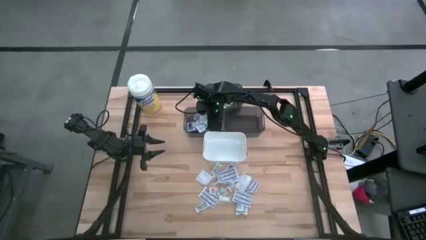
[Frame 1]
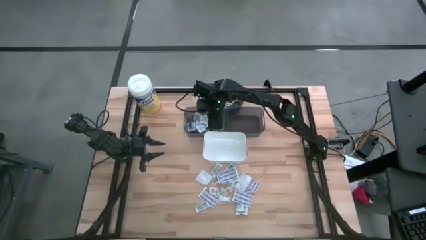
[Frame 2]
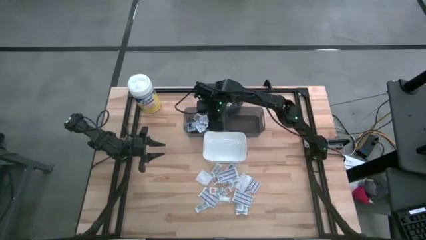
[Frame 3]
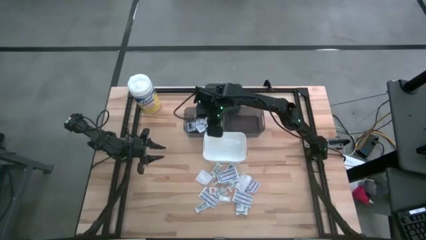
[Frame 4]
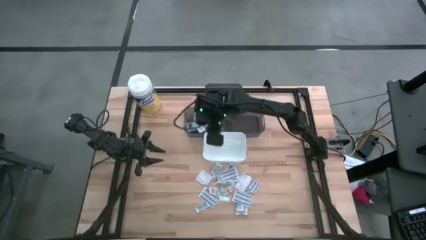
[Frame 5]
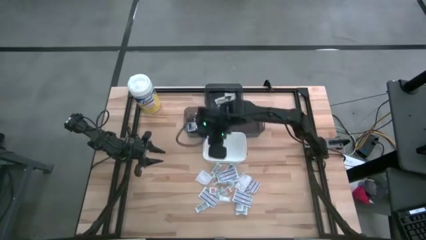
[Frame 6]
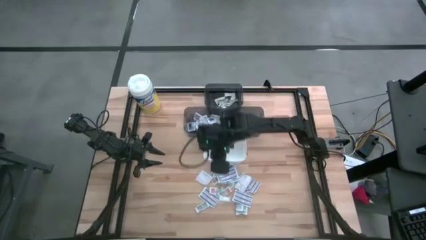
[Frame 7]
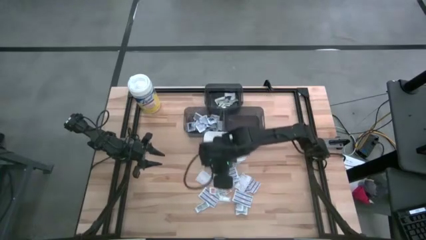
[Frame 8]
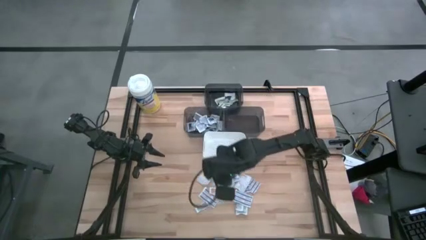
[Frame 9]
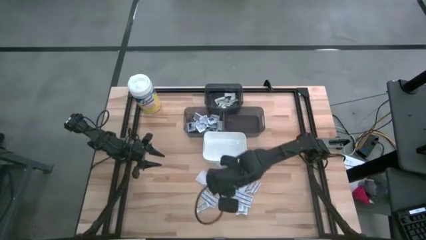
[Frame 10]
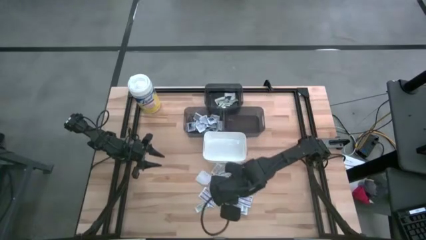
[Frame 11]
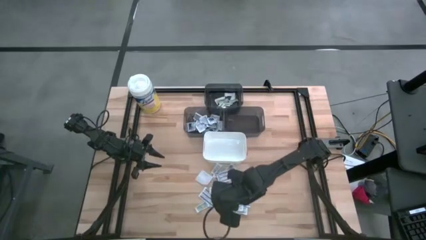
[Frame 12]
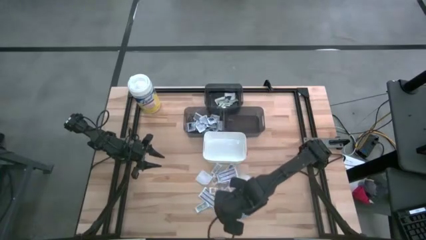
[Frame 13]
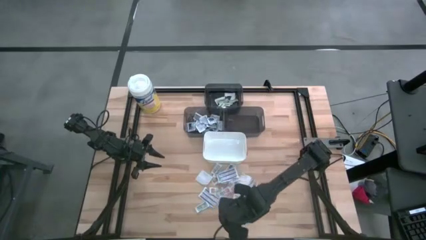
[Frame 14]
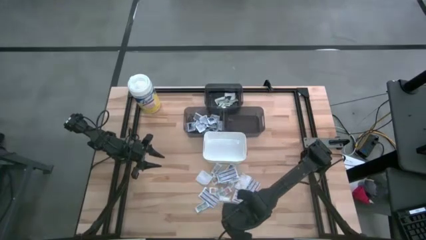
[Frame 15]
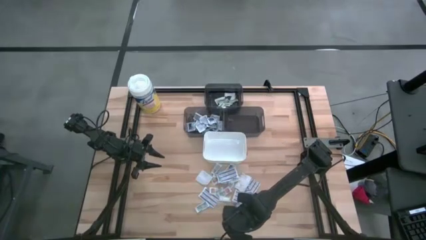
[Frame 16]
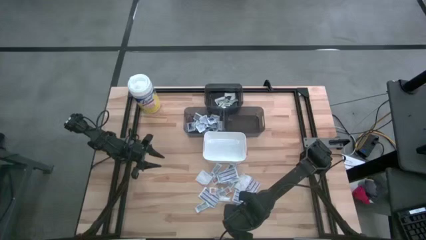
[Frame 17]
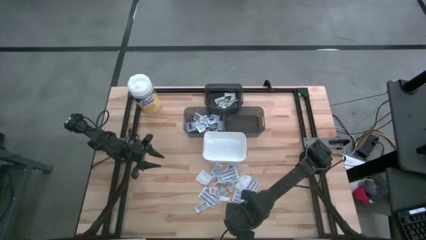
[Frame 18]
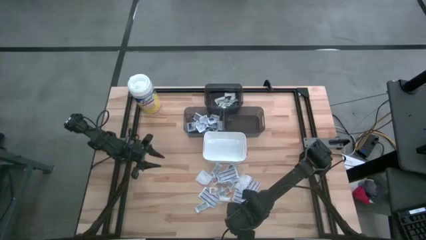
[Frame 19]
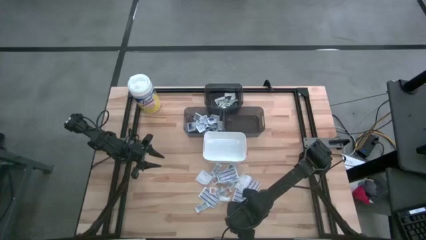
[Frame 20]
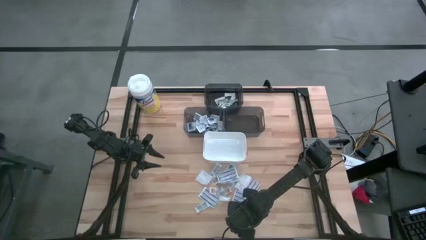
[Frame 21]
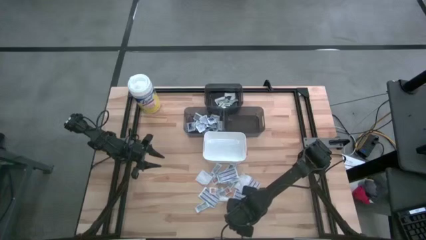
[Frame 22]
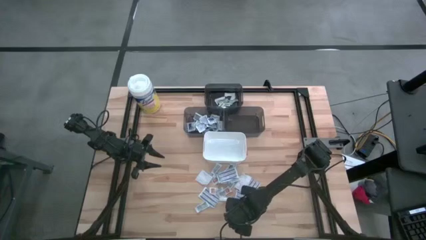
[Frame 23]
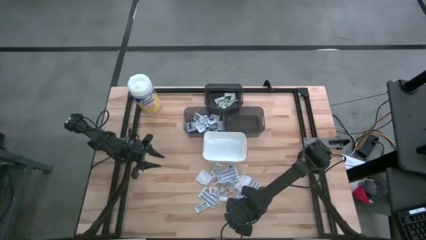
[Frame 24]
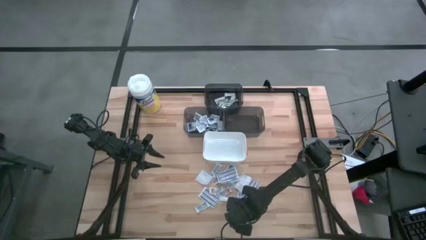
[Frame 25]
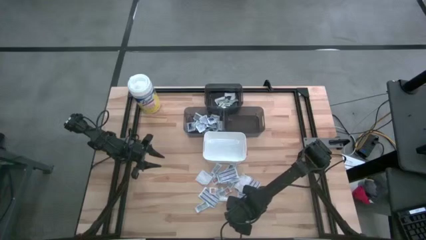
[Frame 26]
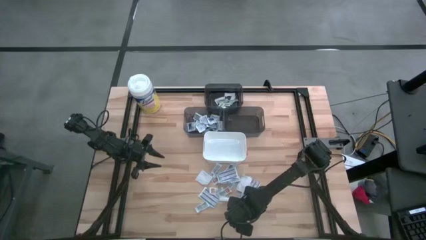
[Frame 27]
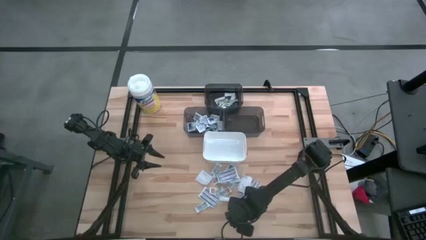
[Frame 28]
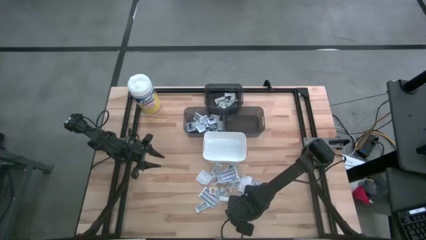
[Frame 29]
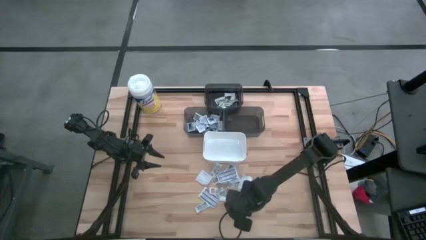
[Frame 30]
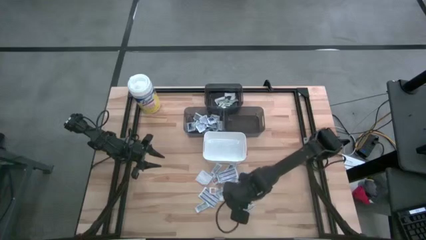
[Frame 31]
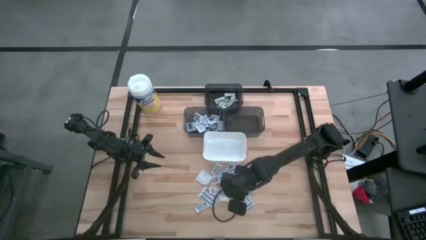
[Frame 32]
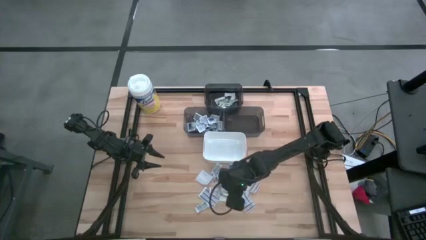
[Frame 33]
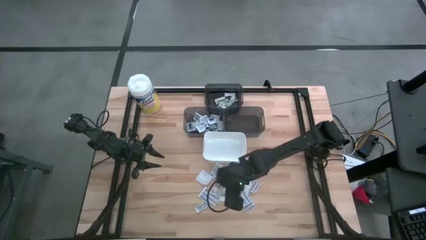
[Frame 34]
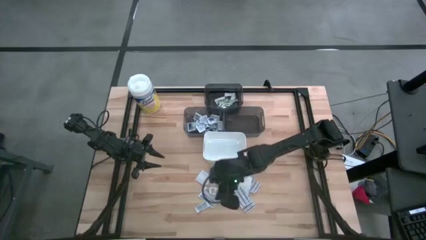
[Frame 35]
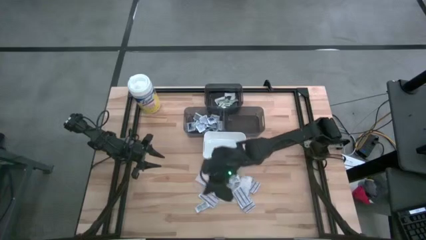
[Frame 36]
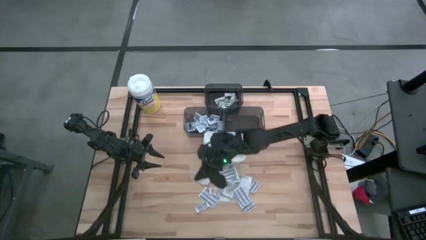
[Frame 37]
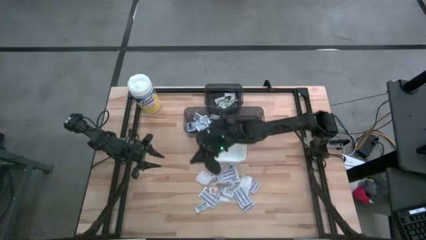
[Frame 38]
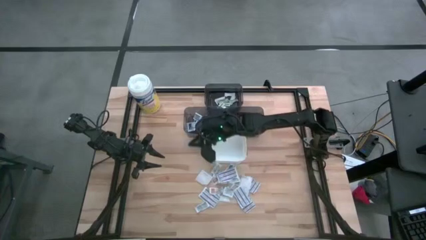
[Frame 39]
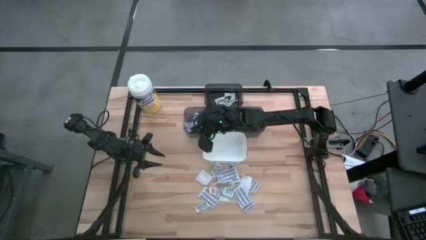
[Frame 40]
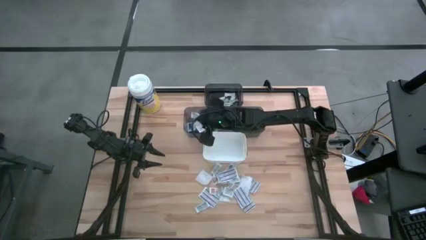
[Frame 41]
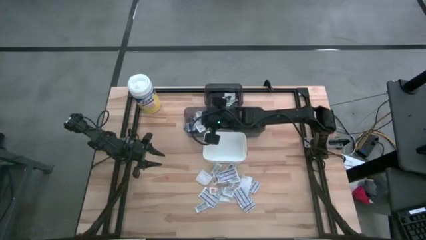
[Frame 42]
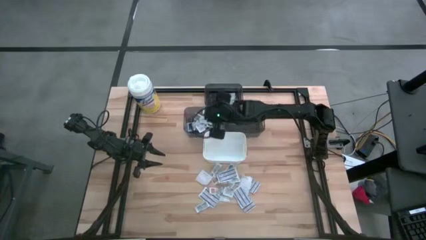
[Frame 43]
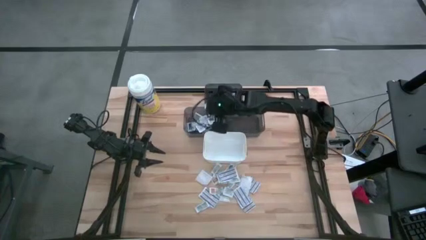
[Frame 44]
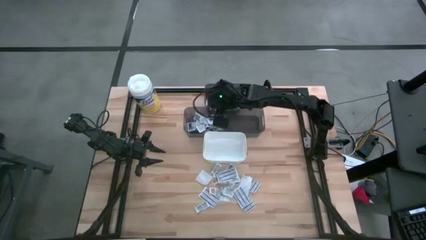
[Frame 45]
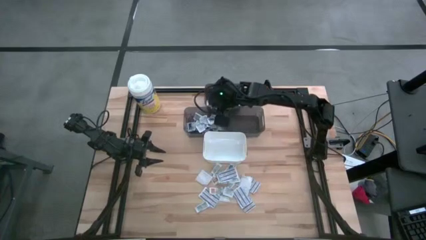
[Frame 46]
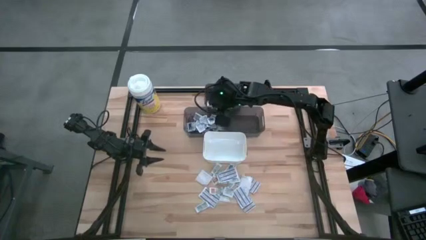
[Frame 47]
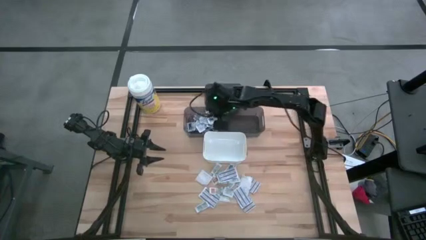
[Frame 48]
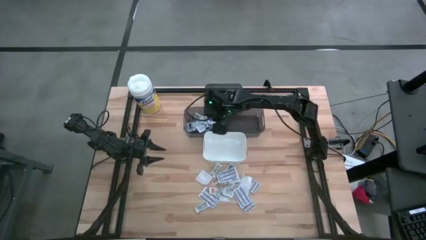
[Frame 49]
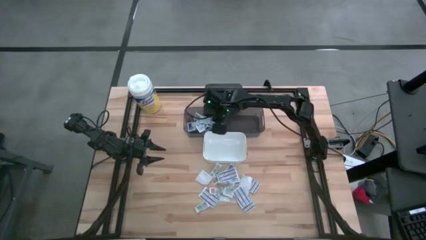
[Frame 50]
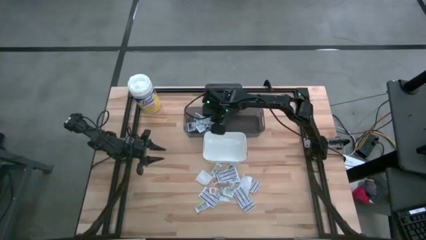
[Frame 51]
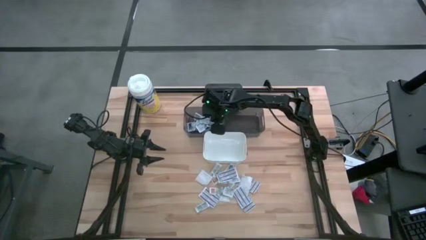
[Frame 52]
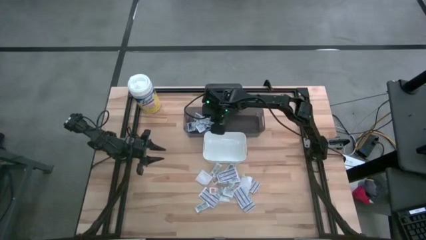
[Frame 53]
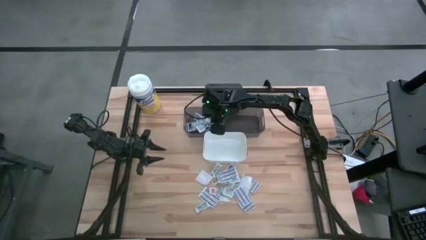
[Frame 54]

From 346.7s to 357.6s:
Task: Pick & Place First Aid Supplies
Put the alcohol pad into the left black bin

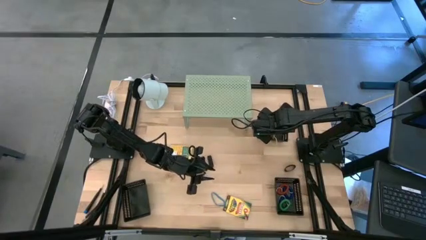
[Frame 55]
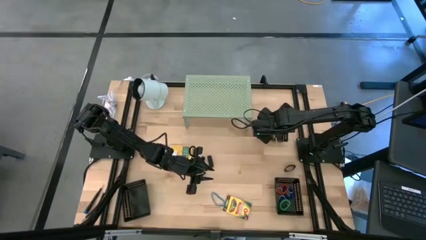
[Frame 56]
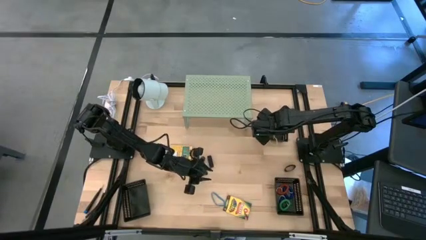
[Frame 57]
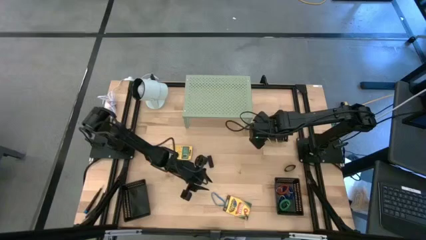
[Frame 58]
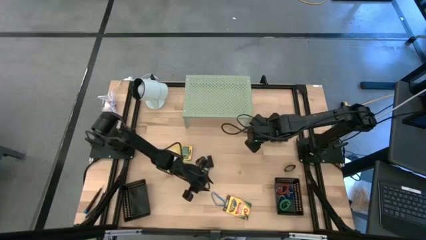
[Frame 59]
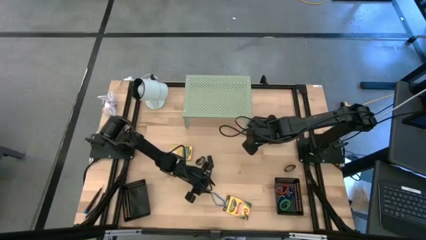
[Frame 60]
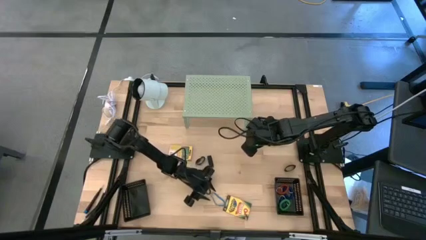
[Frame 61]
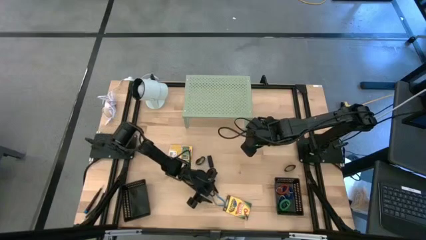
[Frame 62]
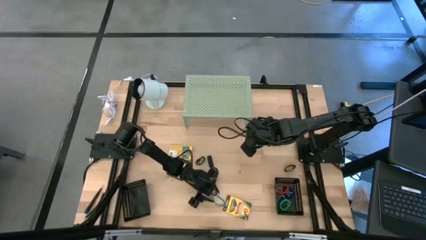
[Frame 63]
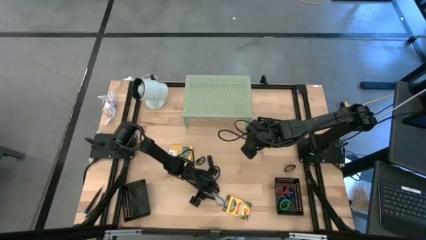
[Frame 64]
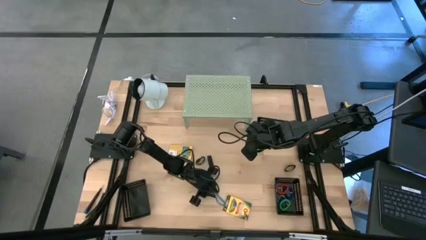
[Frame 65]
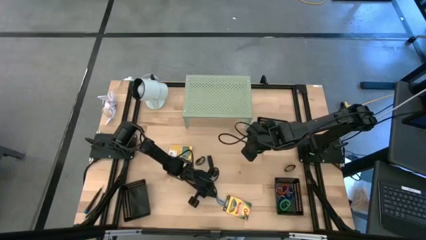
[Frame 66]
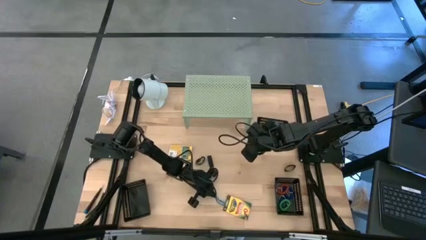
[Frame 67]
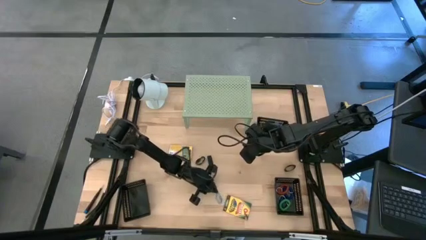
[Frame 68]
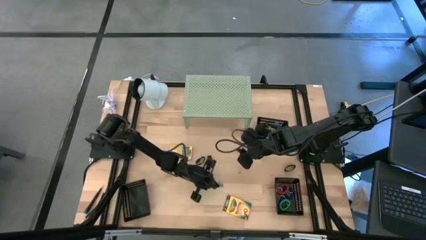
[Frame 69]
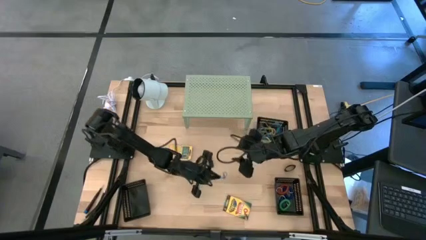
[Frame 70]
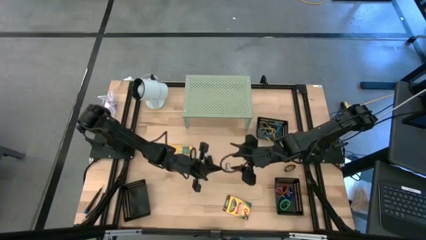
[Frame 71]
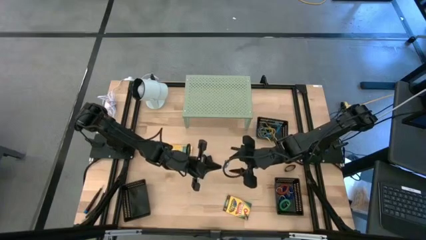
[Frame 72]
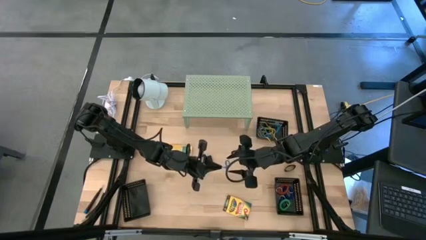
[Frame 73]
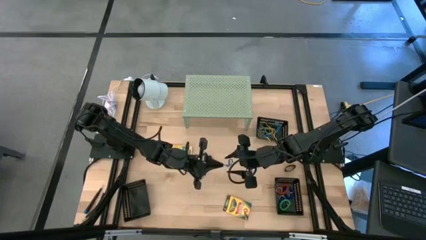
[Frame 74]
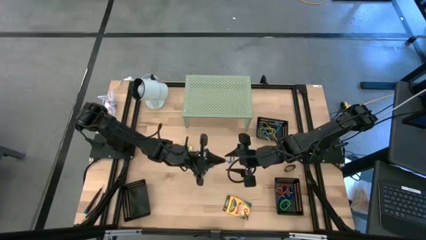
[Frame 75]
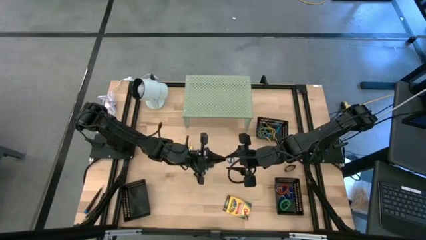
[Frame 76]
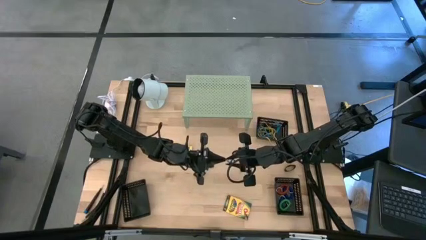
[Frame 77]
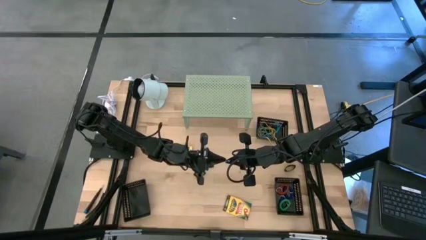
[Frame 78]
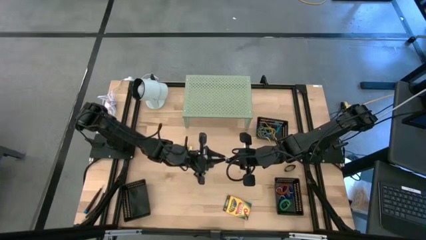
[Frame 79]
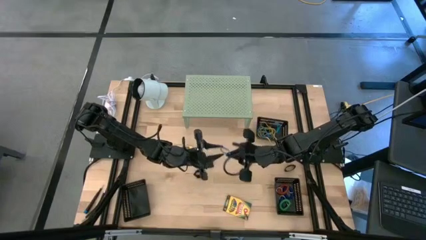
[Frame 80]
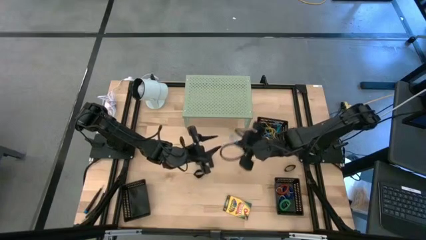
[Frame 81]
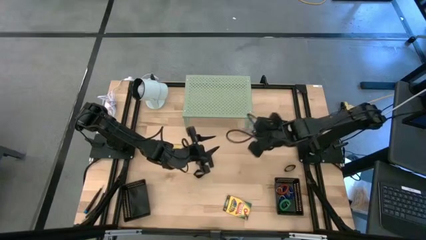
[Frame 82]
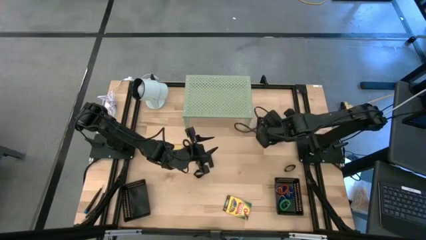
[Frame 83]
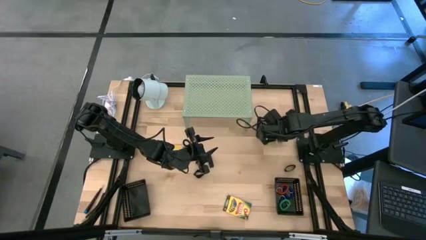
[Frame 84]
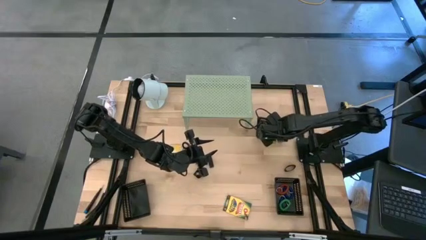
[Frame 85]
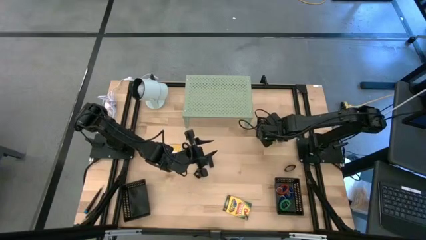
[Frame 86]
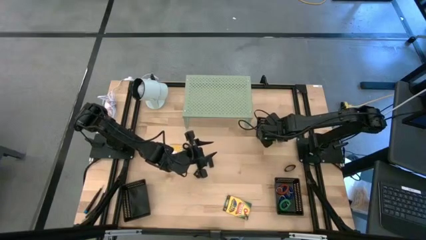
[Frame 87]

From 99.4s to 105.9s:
Task: Pick & Place Office Desk Supplies
Put the blue rubber band into the top right black bin
